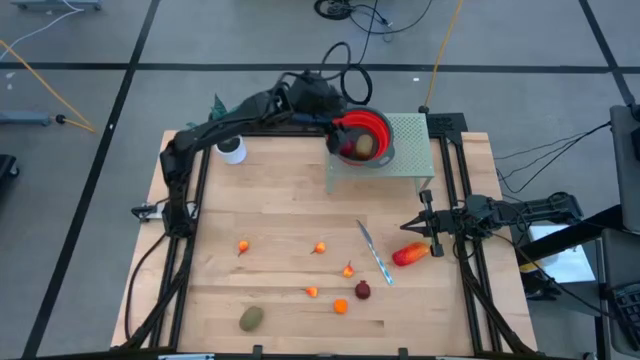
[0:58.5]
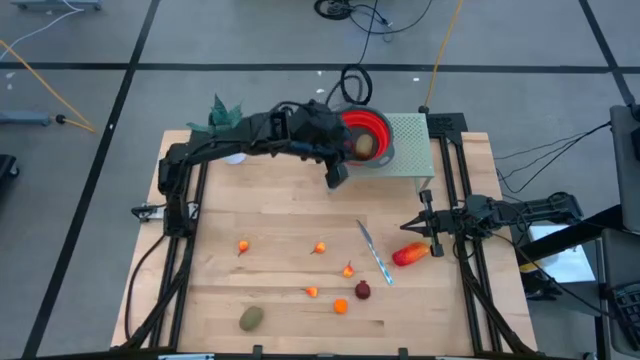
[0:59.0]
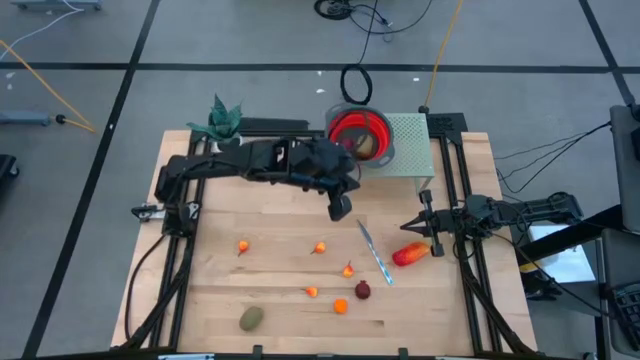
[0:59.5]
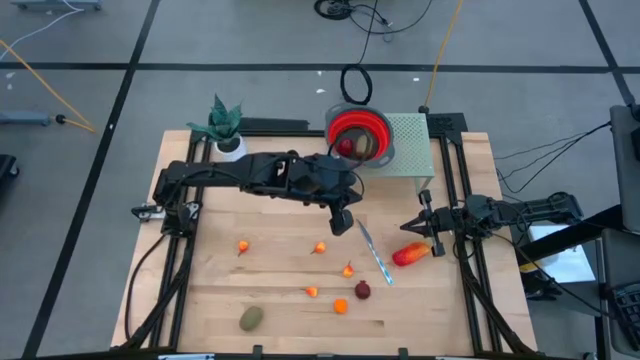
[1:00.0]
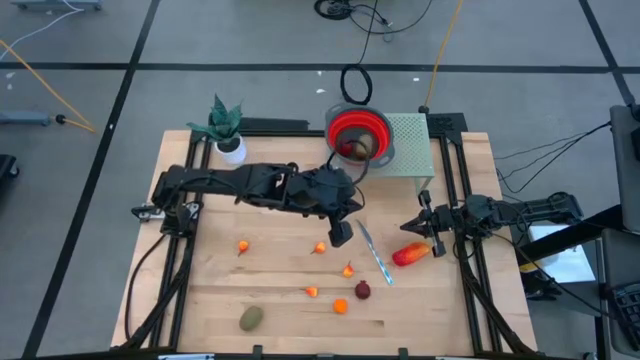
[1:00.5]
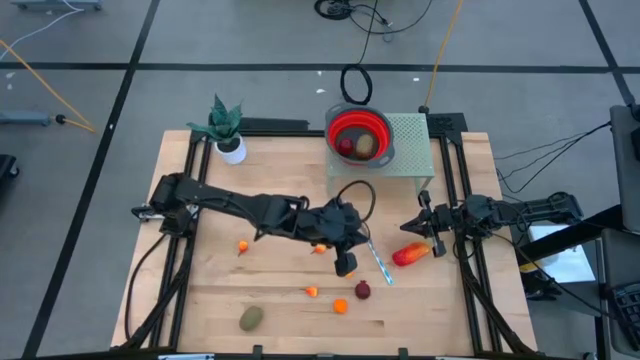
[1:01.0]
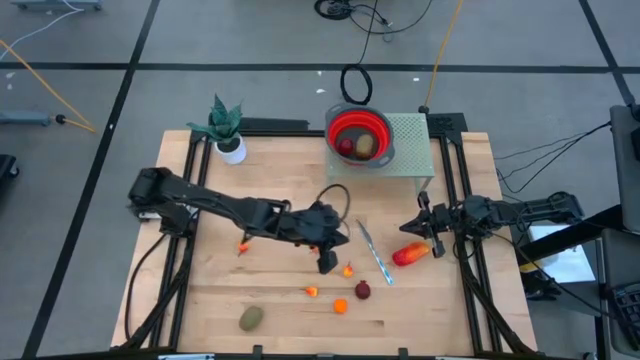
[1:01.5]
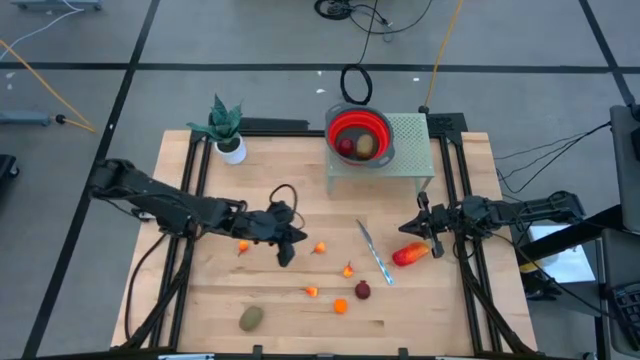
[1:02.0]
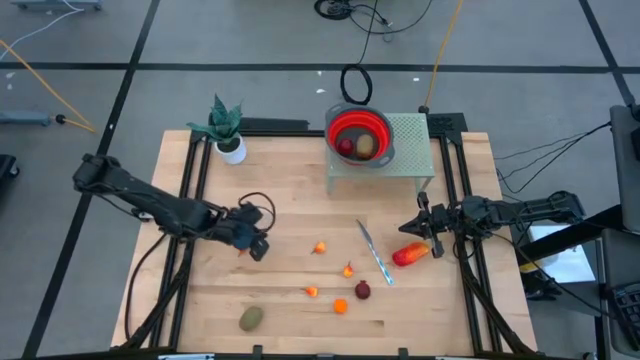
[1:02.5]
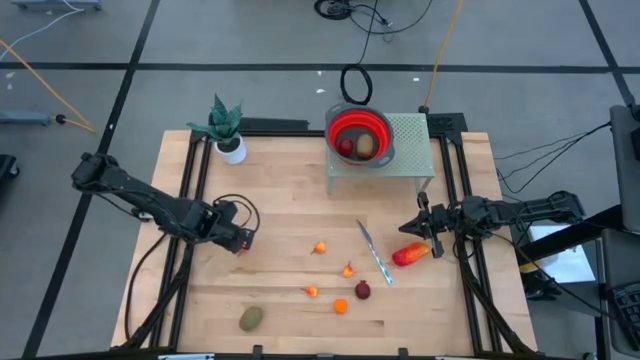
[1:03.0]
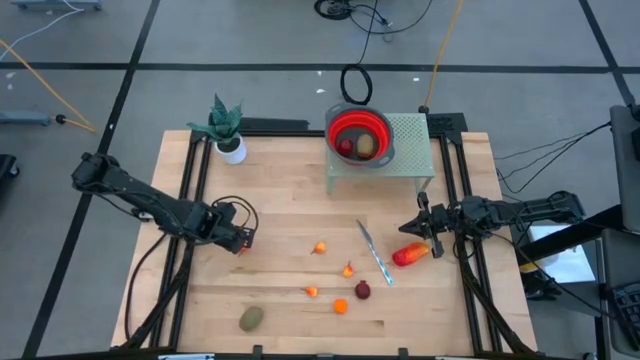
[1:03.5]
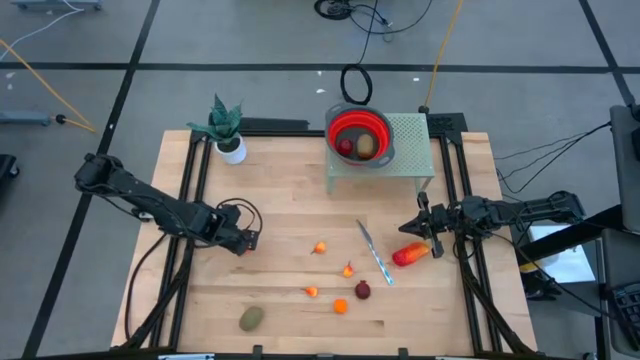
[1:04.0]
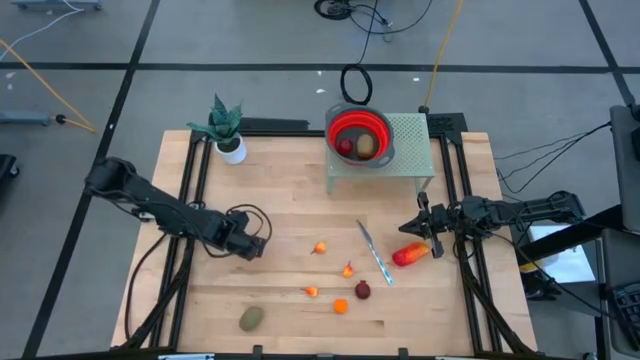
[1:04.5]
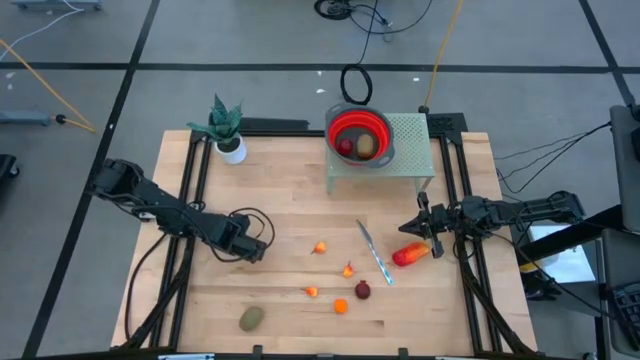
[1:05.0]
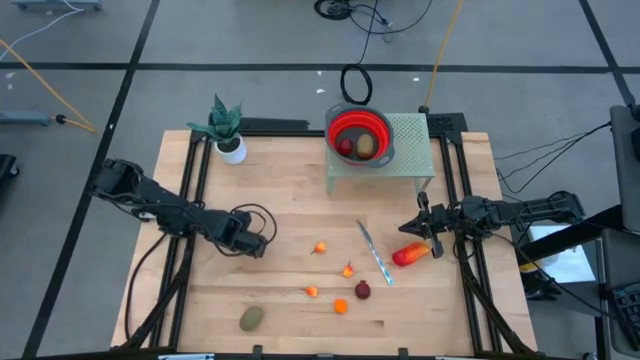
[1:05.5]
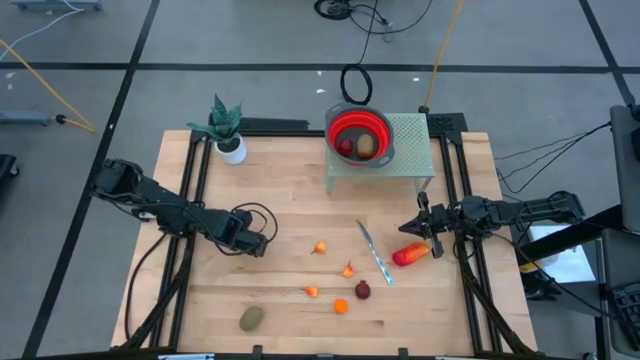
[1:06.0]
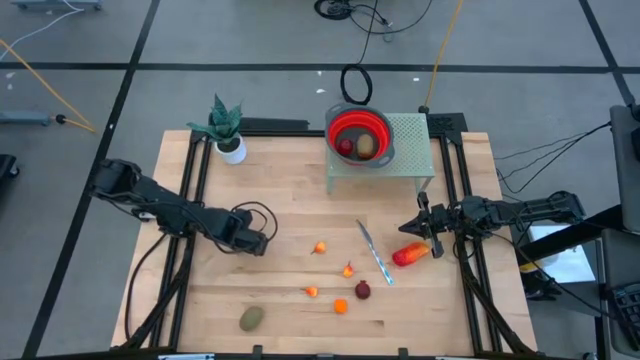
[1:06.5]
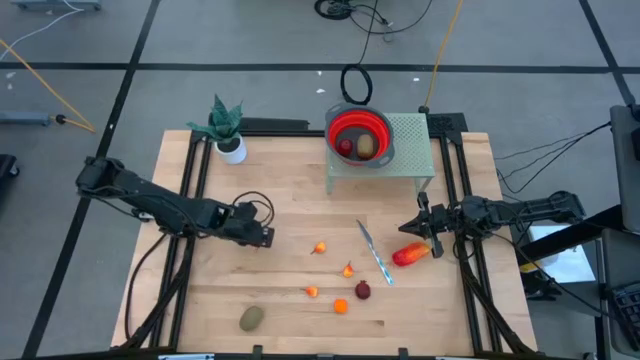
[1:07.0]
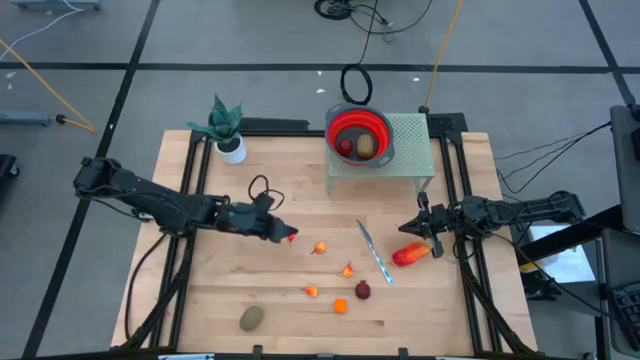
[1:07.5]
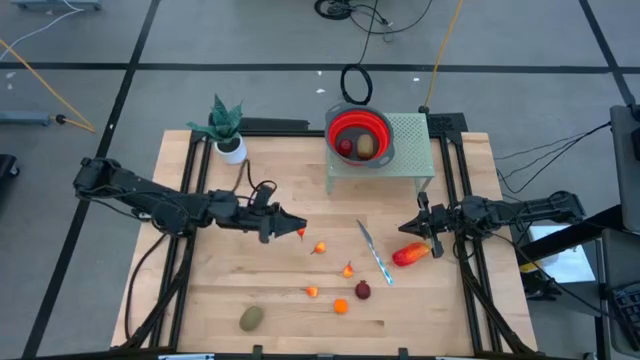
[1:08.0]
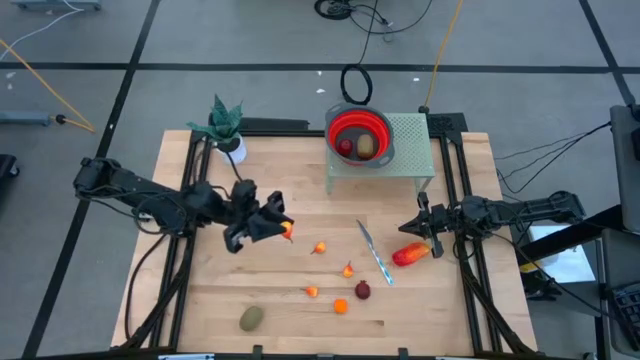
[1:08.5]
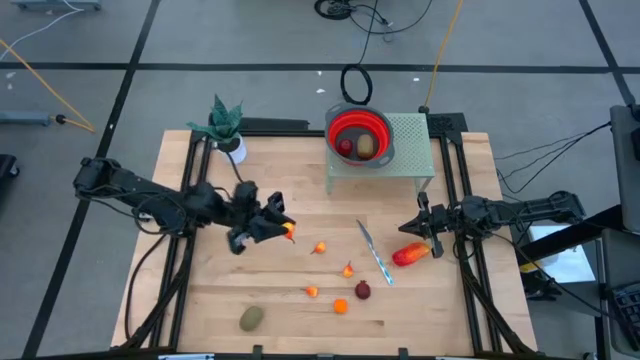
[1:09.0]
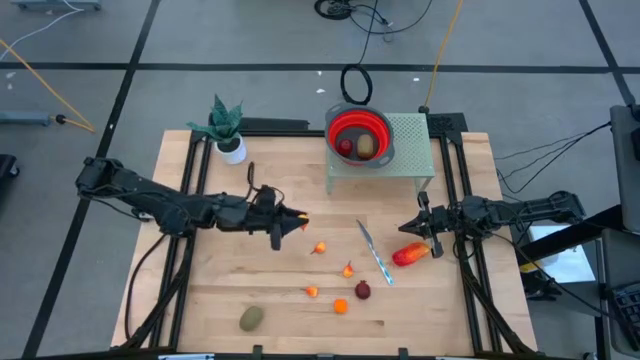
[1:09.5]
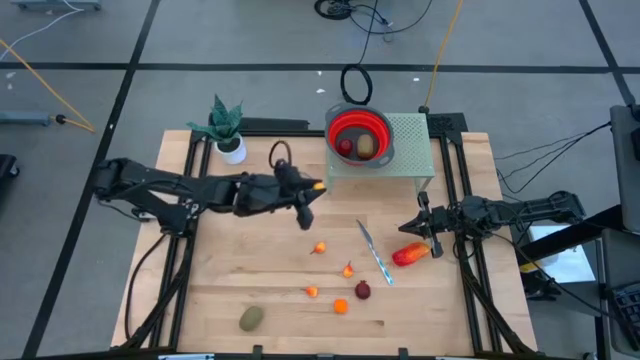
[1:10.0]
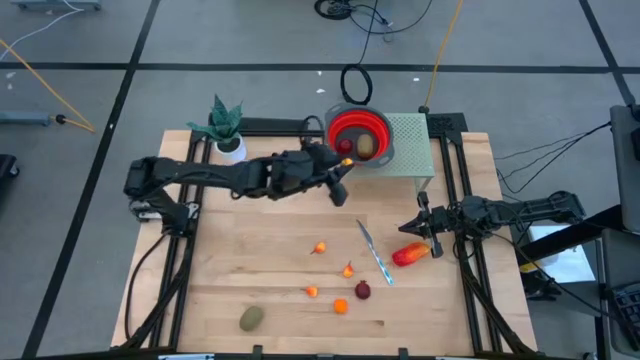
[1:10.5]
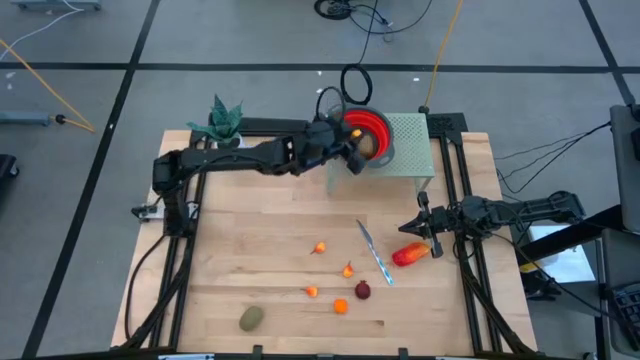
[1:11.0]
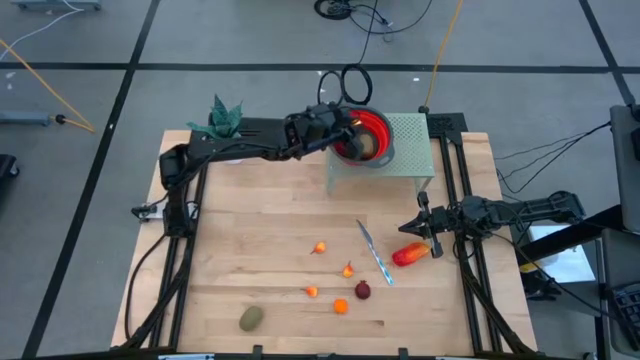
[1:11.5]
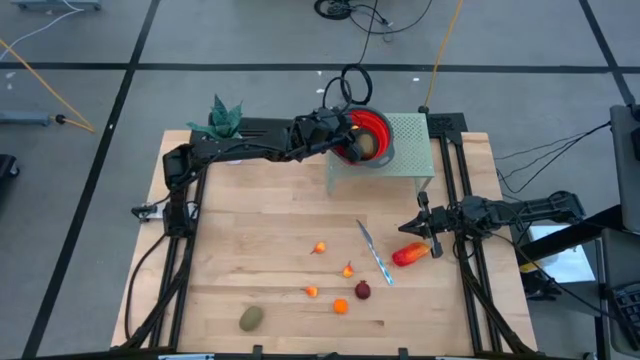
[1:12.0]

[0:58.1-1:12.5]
Task: Pick & Place Fruit
Put the yellow orange peach into the red basket on the shelf

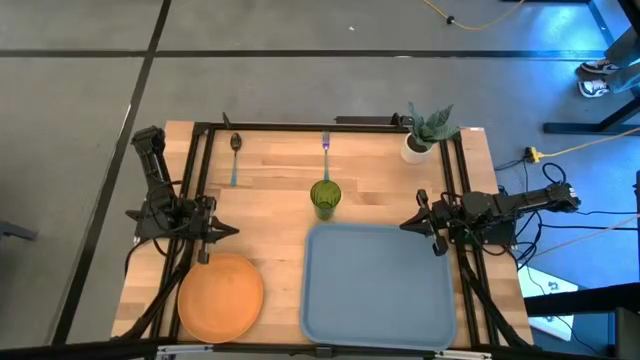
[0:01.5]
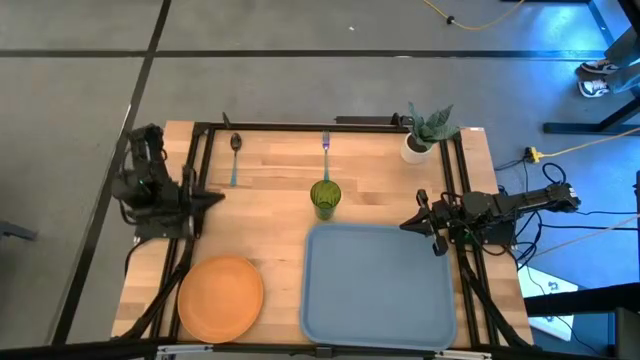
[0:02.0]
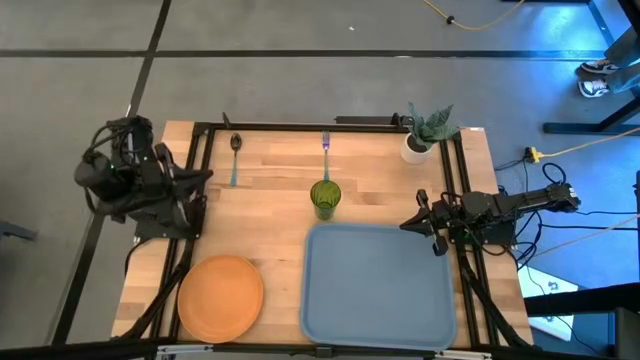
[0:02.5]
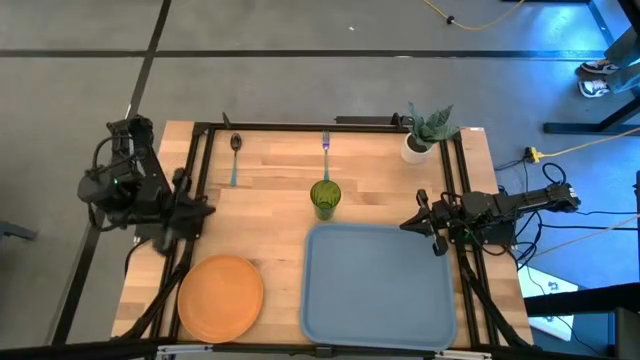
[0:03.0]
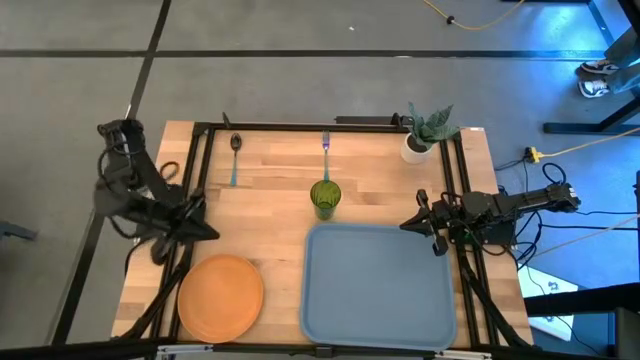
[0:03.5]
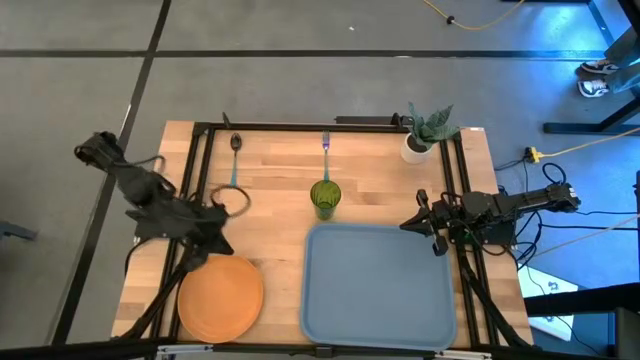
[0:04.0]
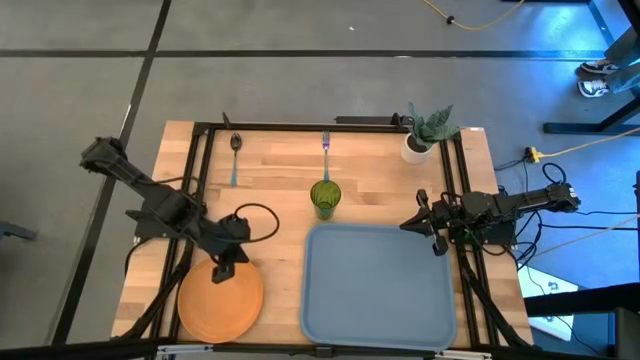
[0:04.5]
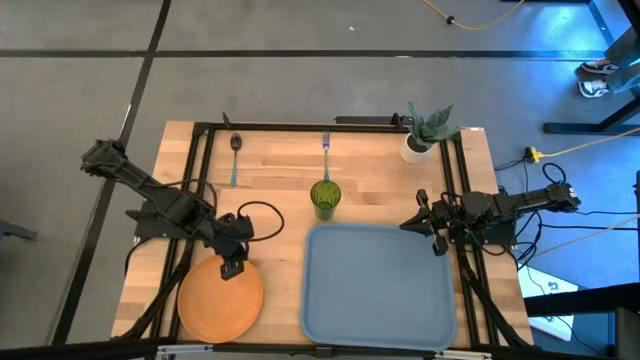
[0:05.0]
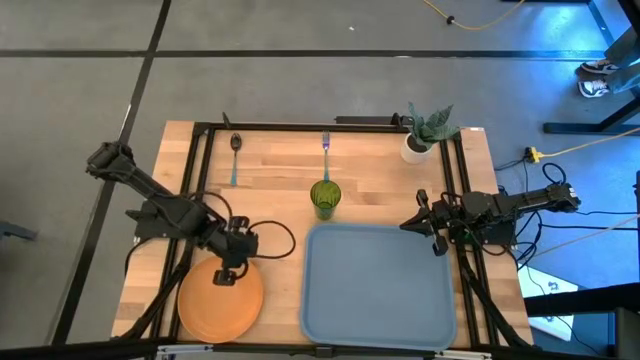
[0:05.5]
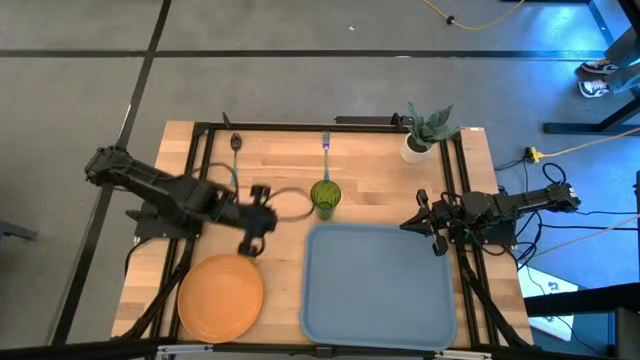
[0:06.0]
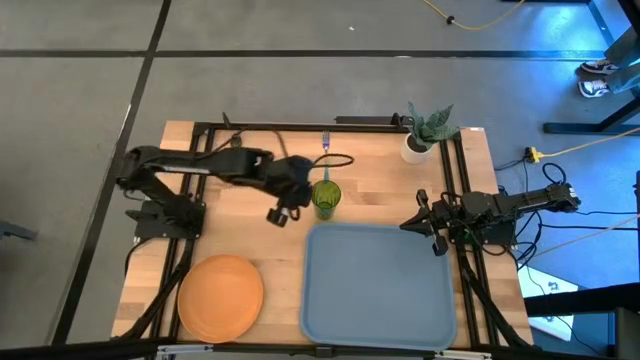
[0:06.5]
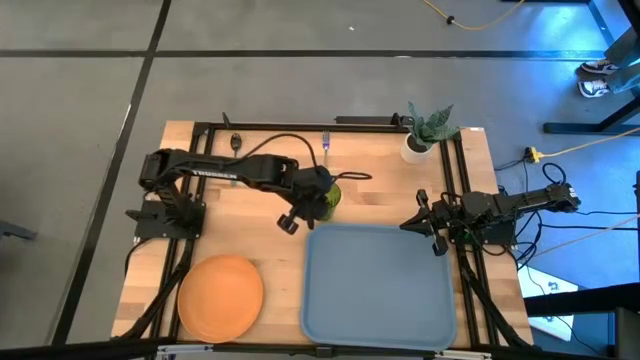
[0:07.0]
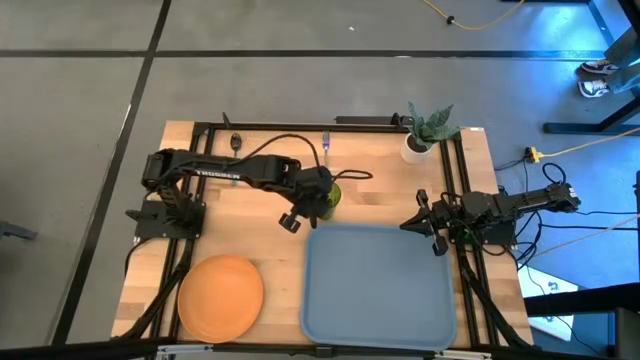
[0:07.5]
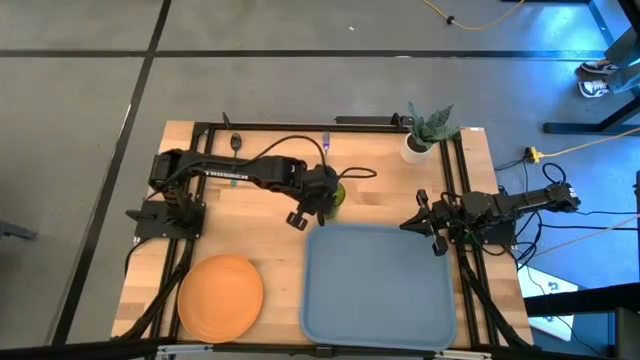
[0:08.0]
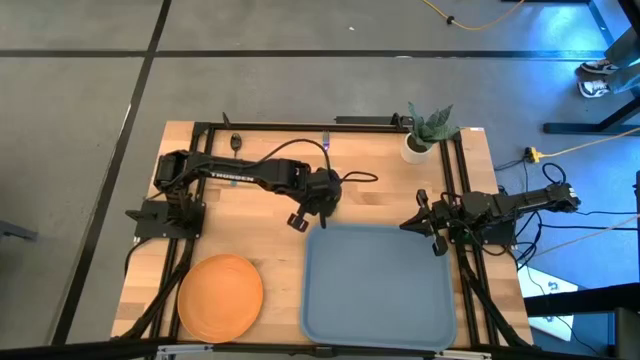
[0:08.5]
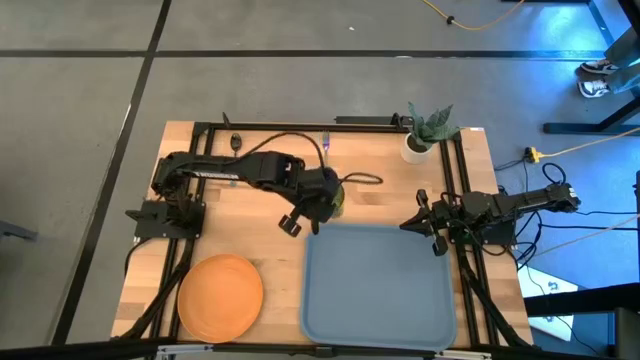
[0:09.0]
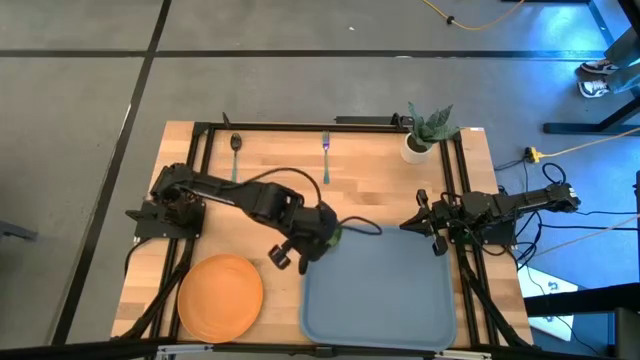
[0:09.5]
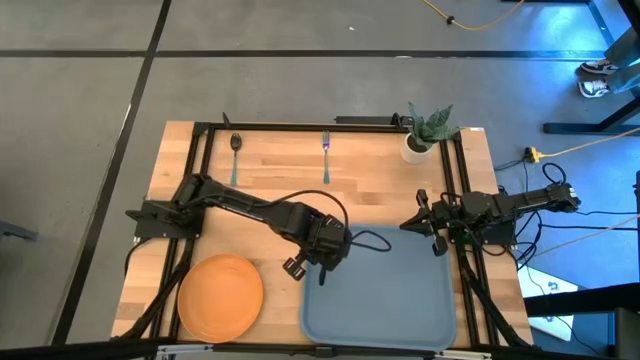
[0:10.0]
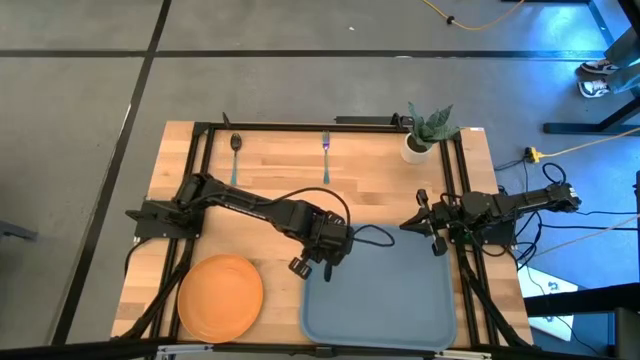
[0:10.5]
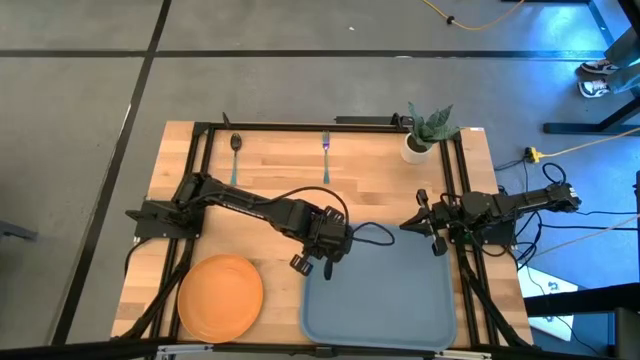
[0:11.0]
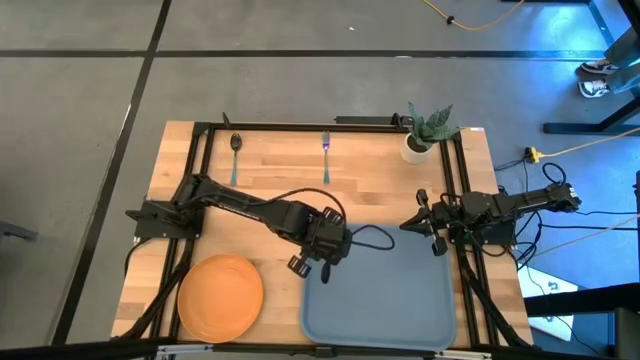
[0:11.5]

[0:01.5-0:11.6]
Task: Pick and place plate/cup/fork/spoon on tray
Put the green cup on the blue tray
